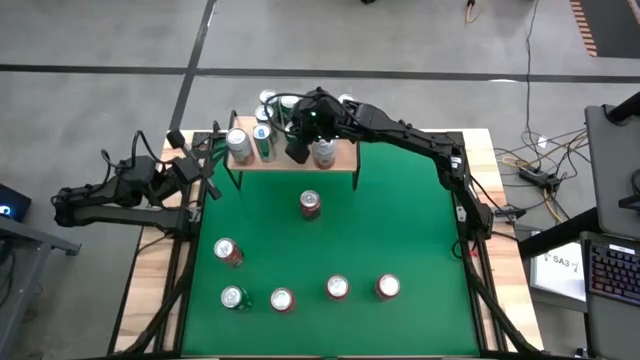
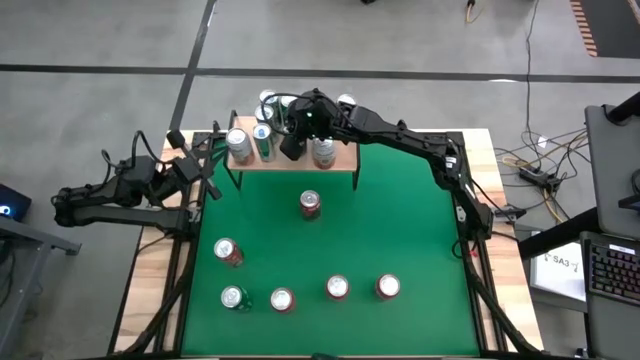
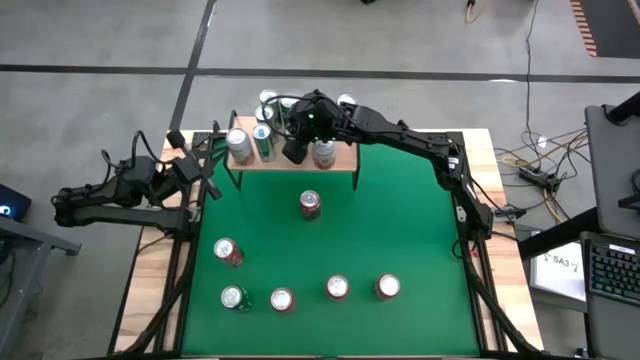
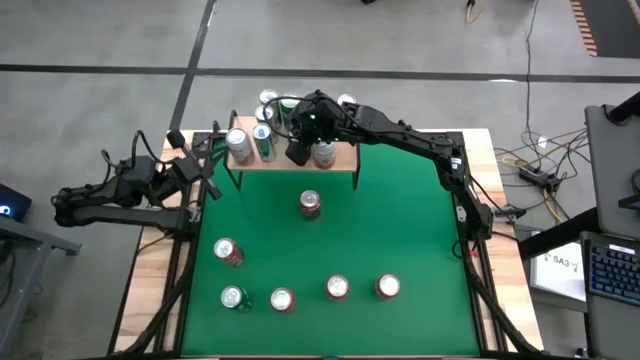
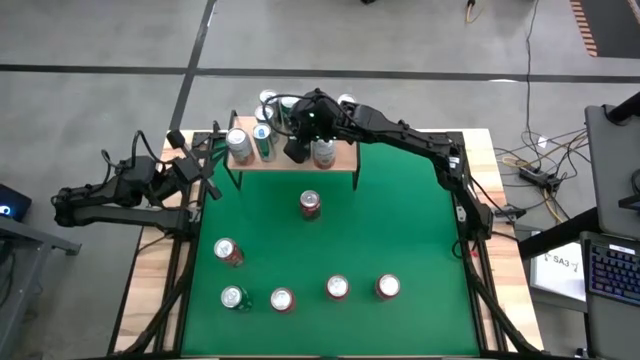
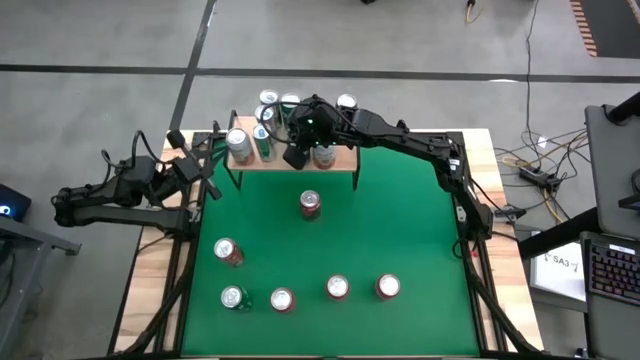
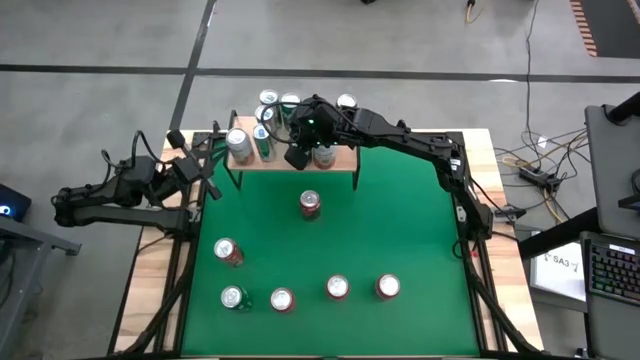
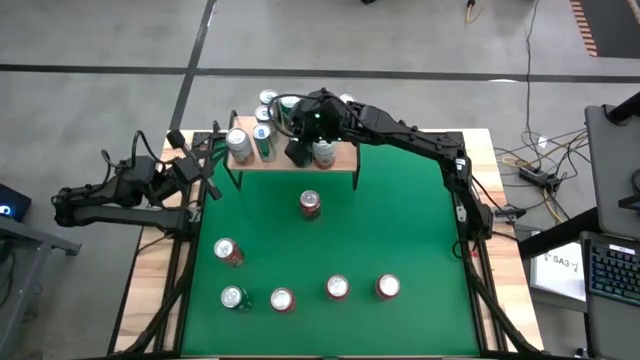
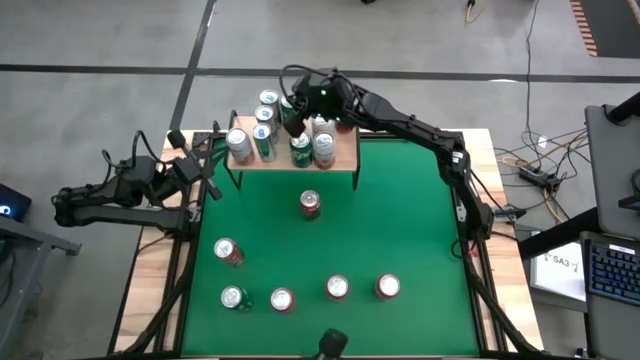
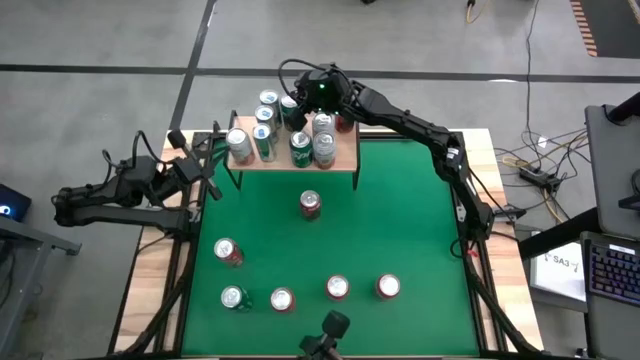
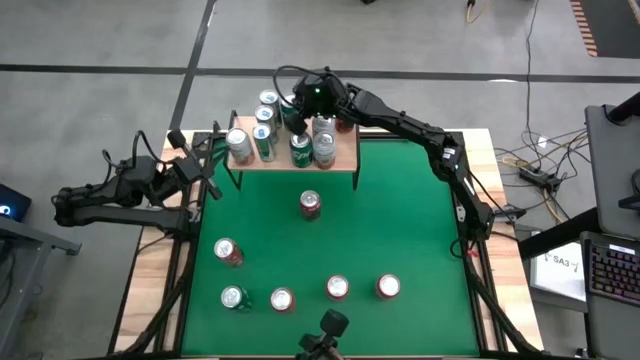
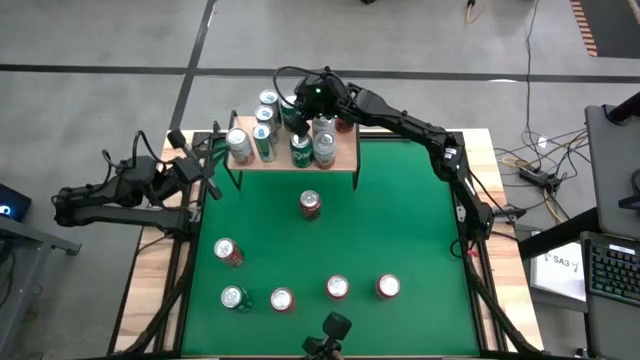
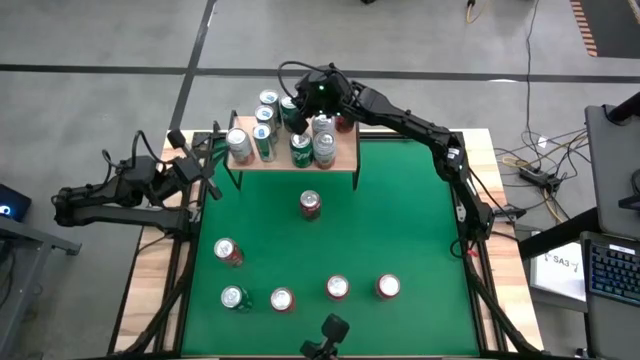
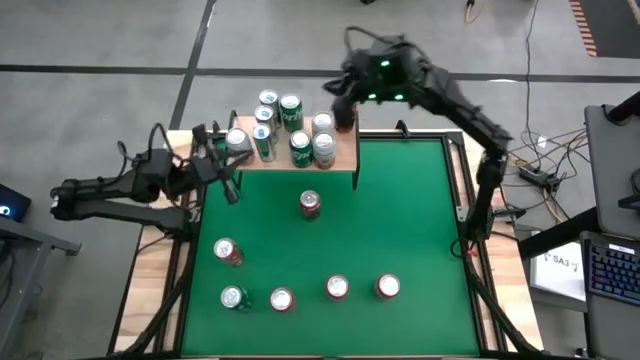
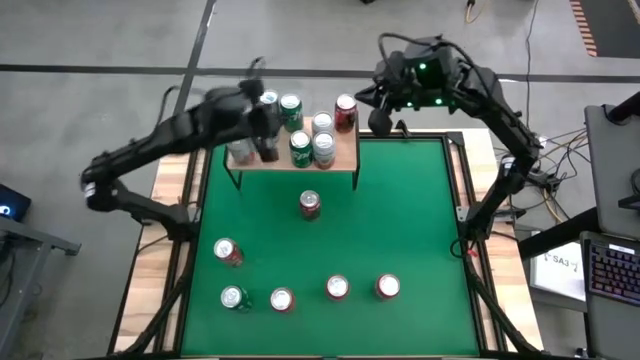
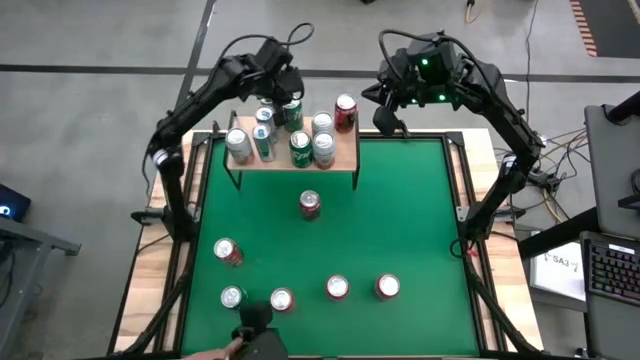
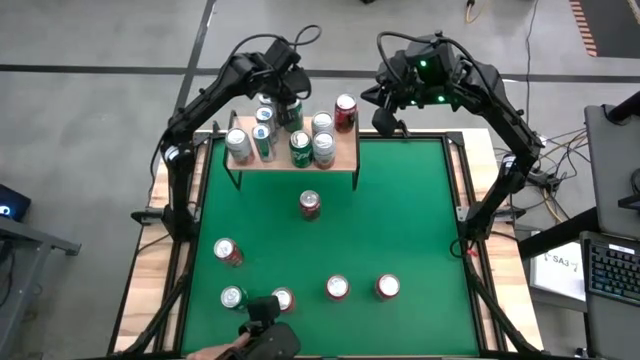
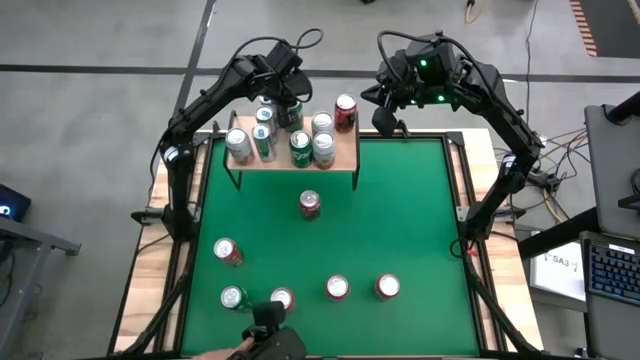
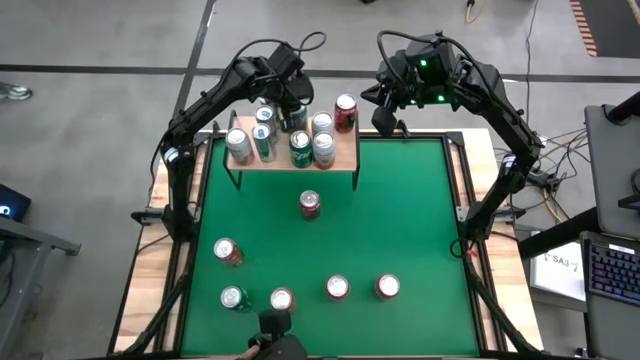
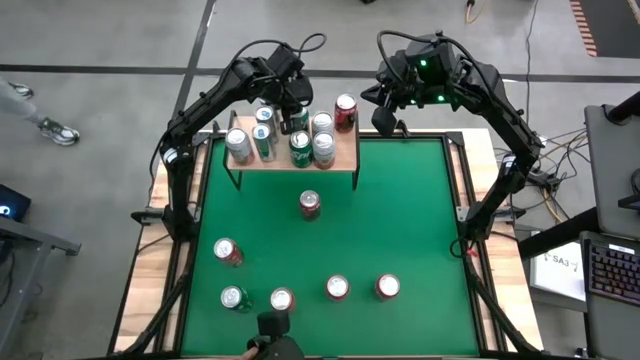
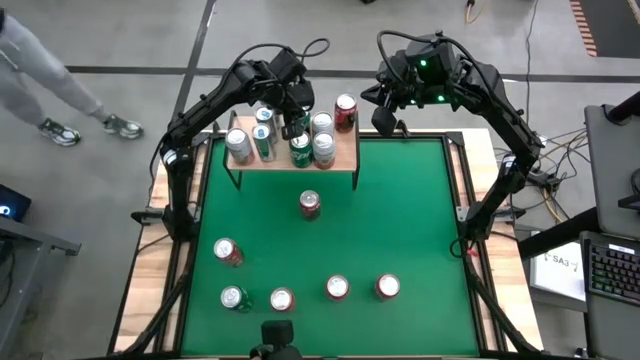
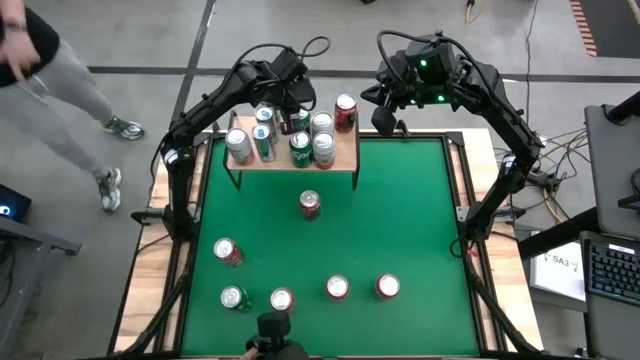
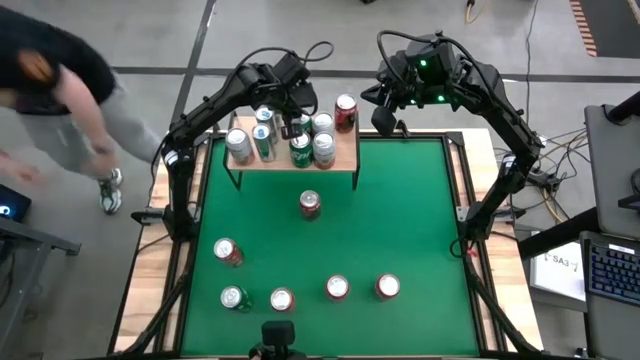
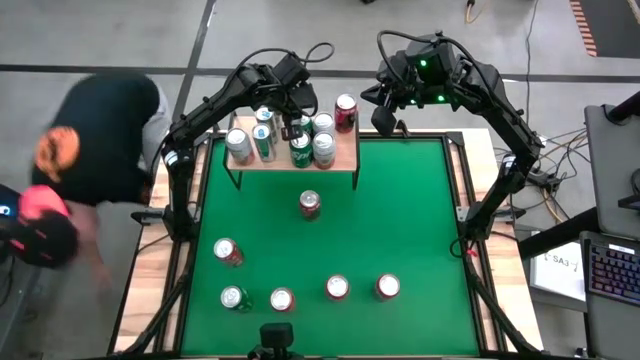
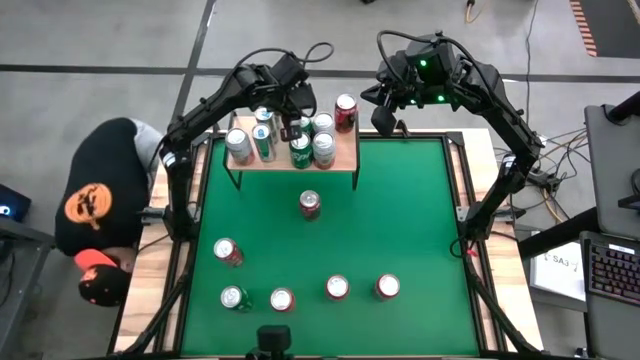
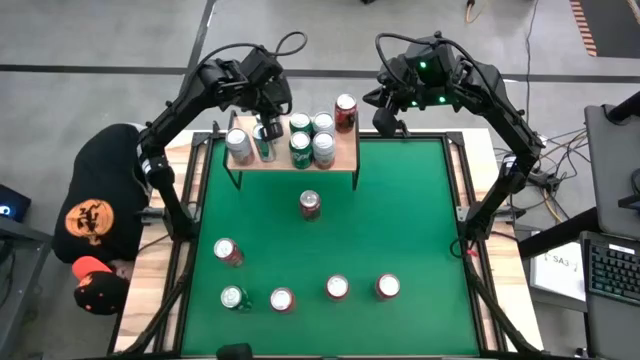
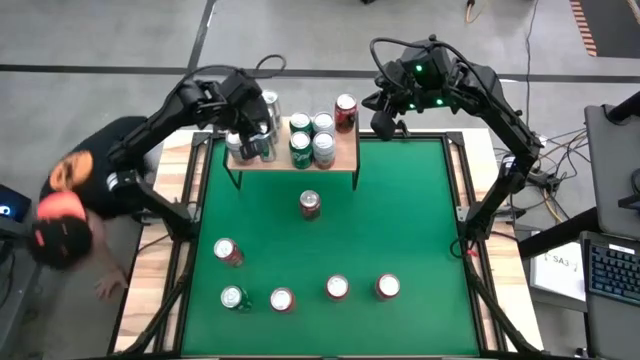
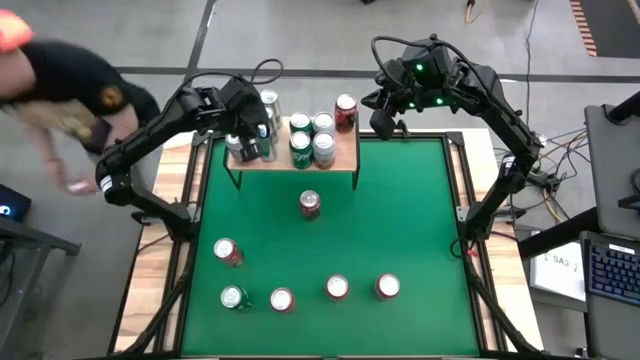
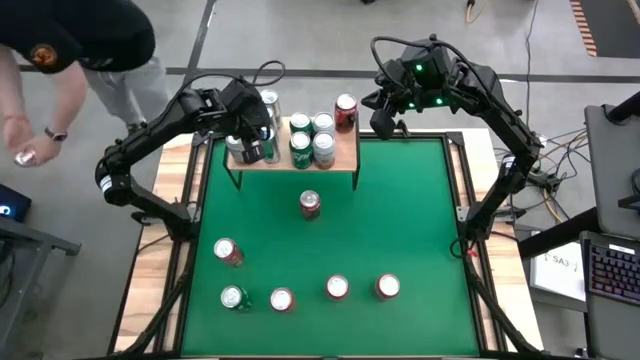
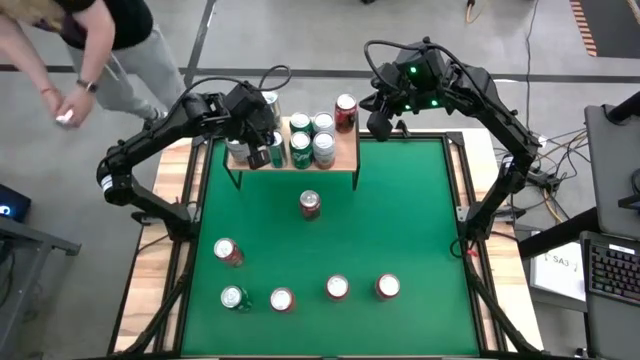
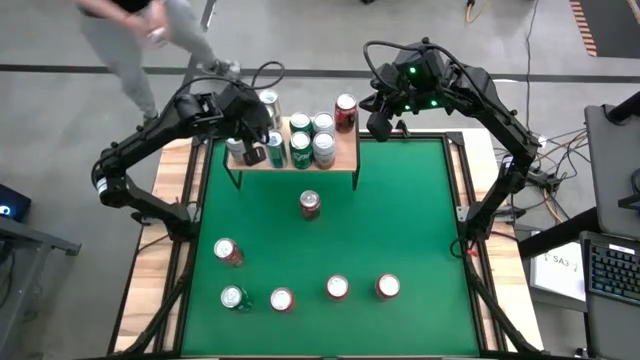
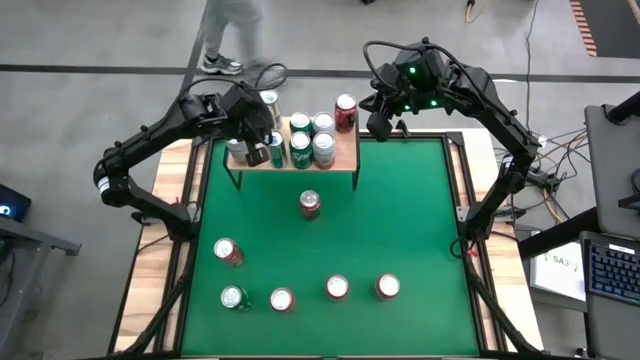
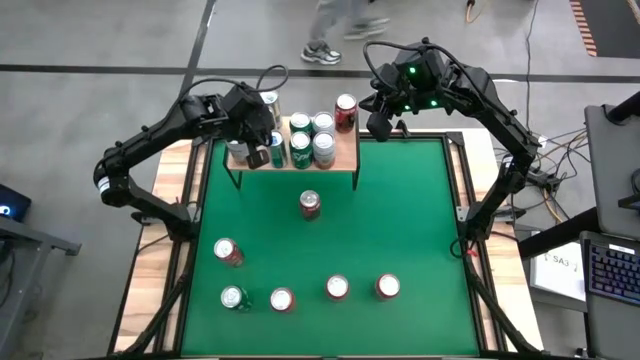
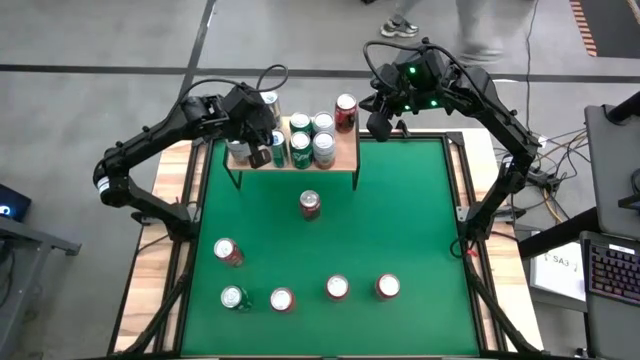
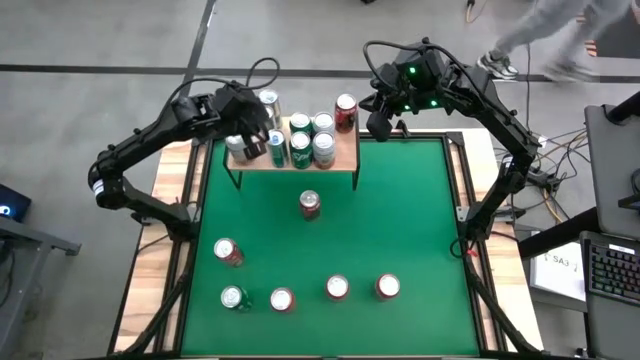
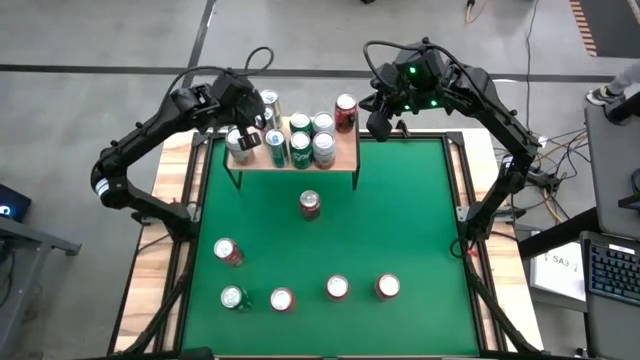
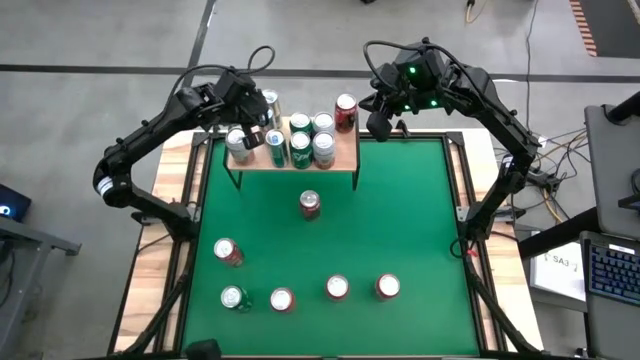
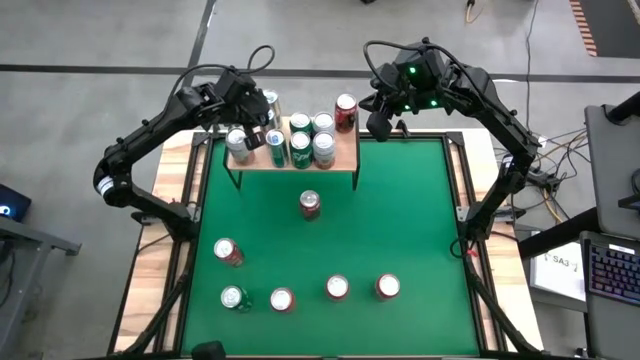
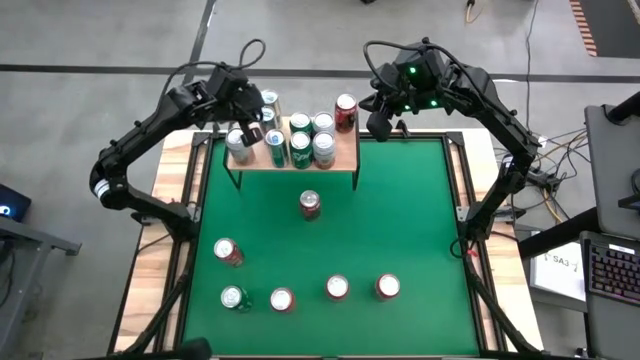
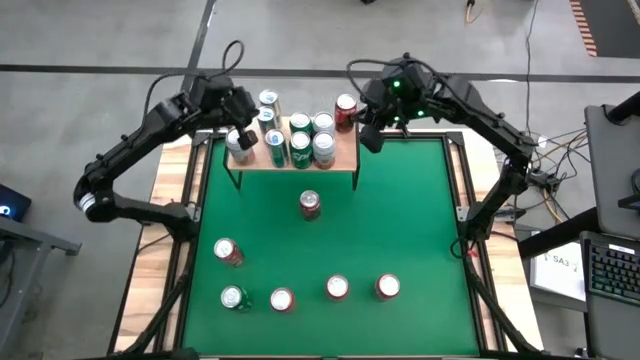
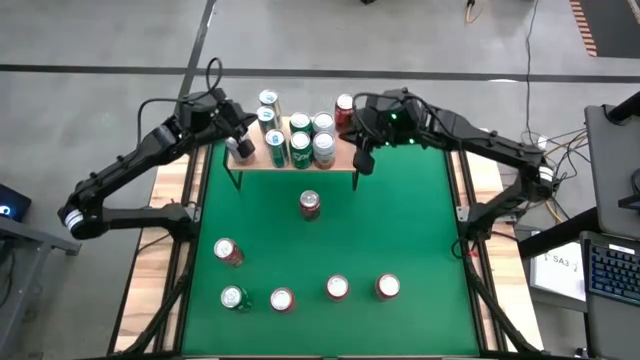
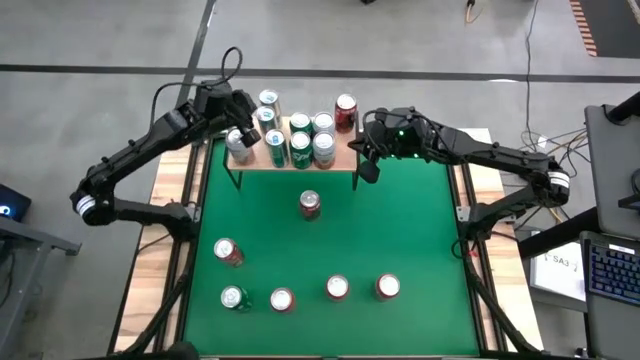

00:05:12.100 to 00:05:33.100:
Task: Place canned beverage on shelf
Put the orange can on the shelf
